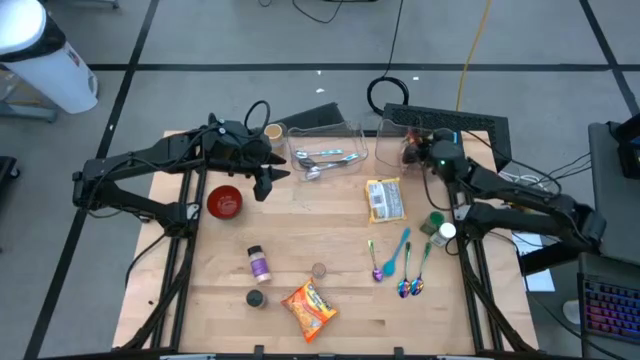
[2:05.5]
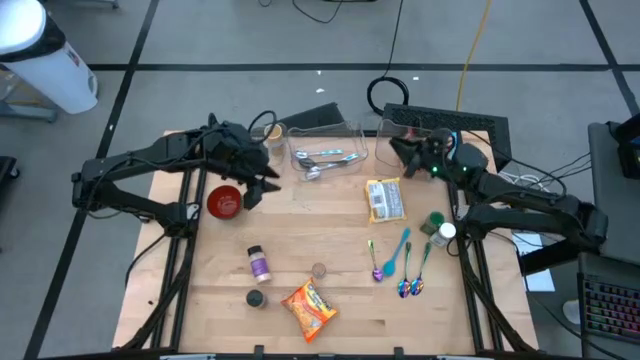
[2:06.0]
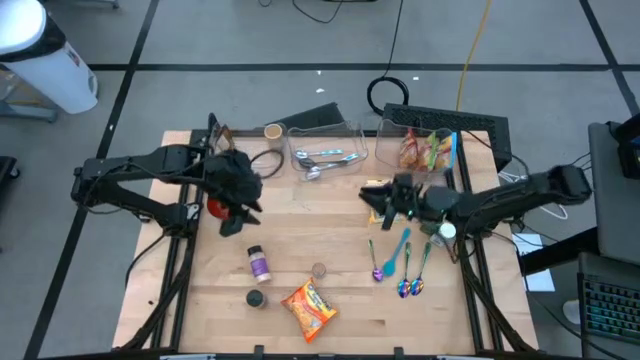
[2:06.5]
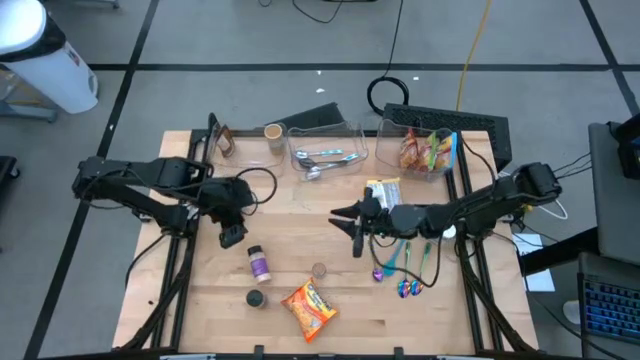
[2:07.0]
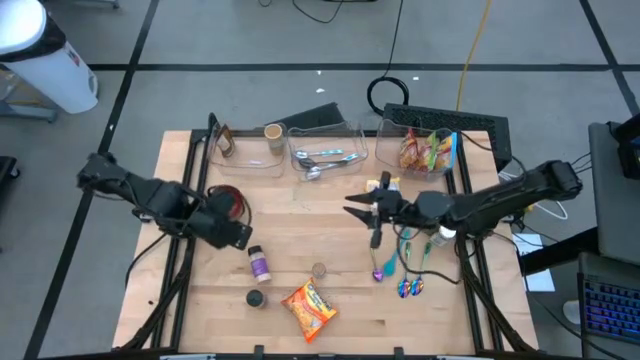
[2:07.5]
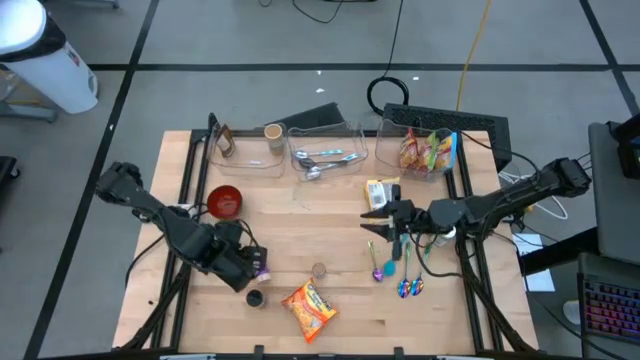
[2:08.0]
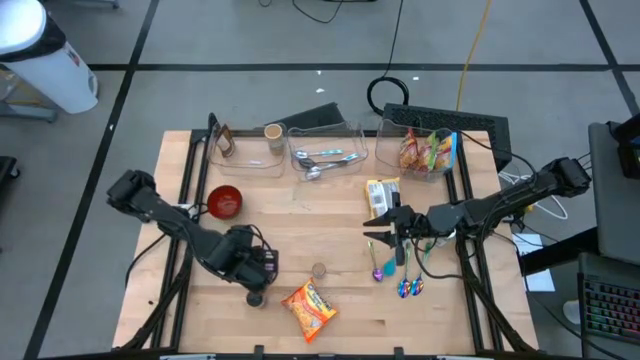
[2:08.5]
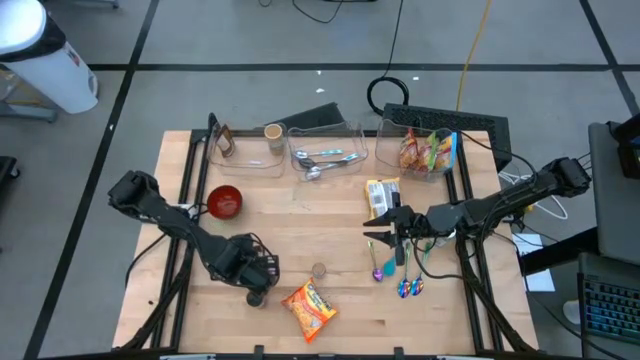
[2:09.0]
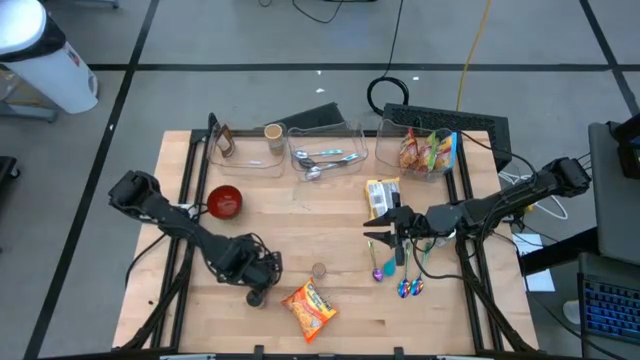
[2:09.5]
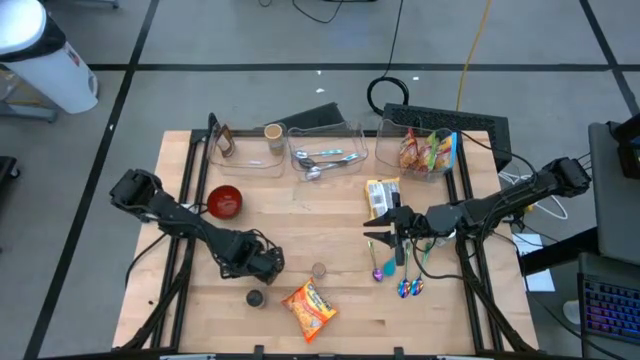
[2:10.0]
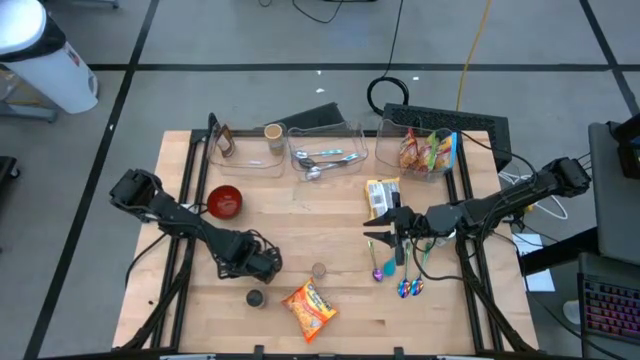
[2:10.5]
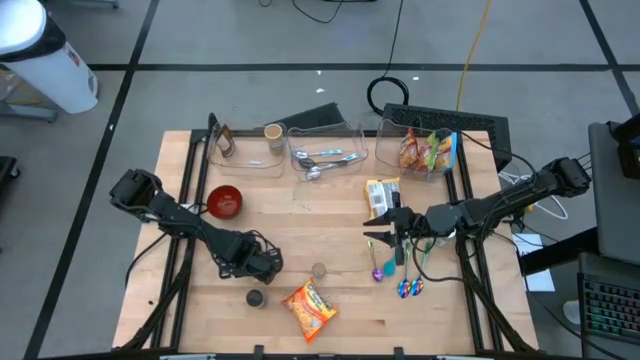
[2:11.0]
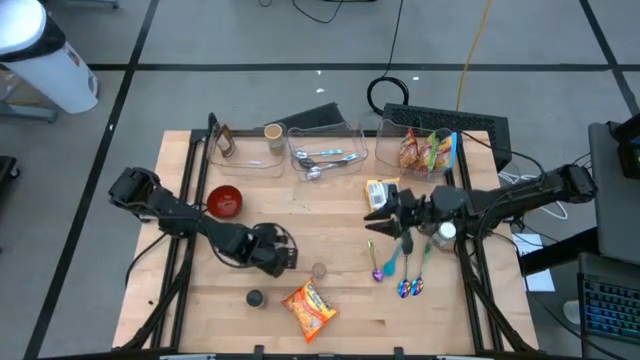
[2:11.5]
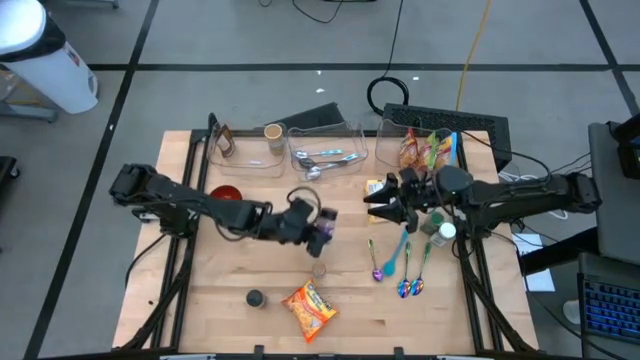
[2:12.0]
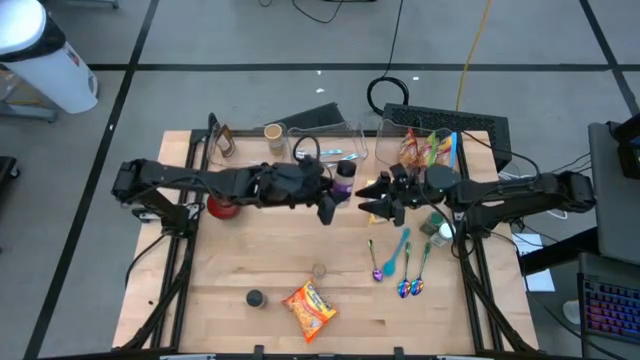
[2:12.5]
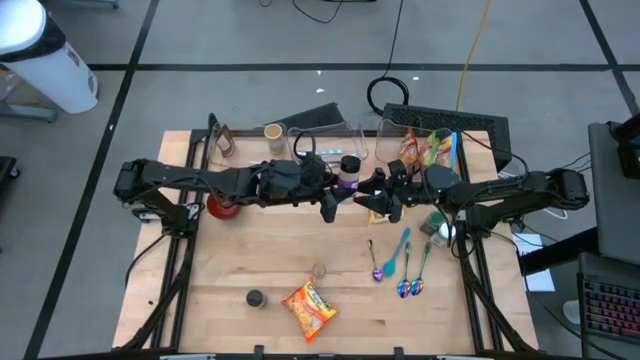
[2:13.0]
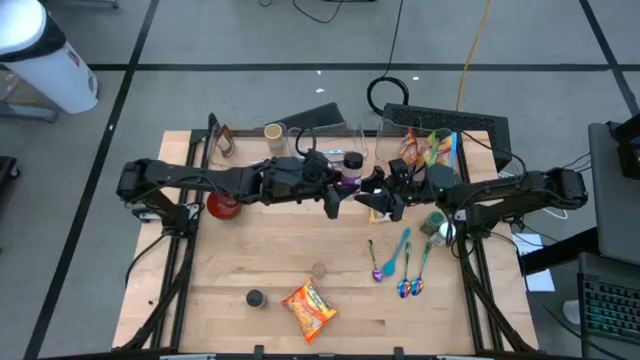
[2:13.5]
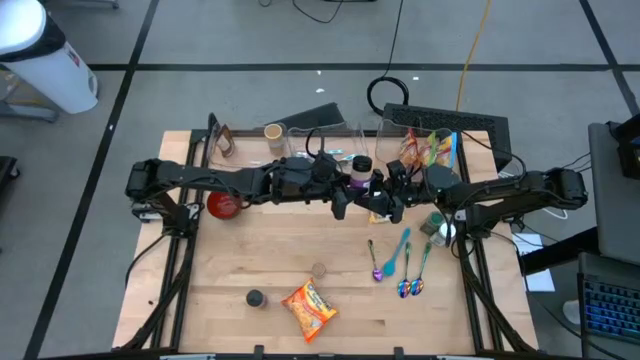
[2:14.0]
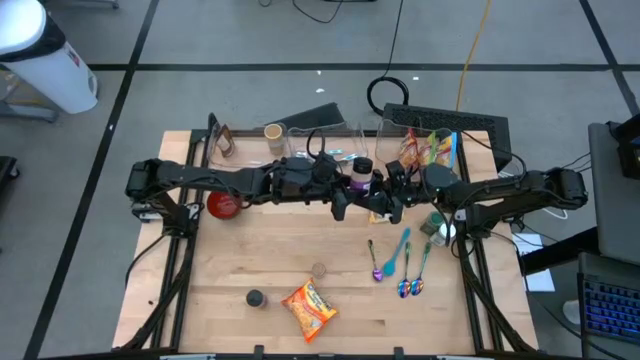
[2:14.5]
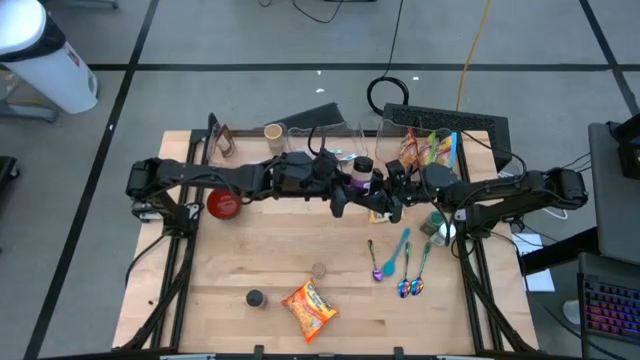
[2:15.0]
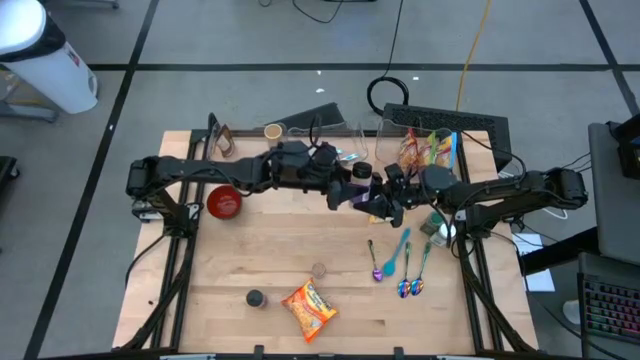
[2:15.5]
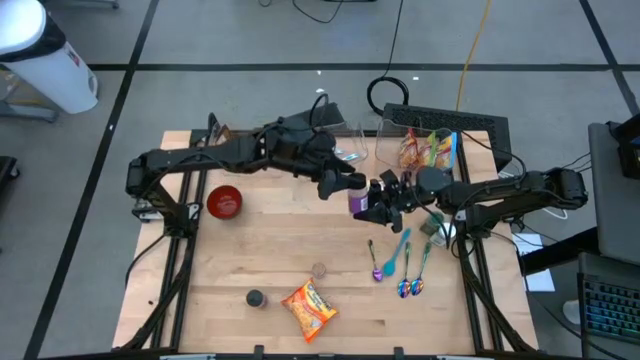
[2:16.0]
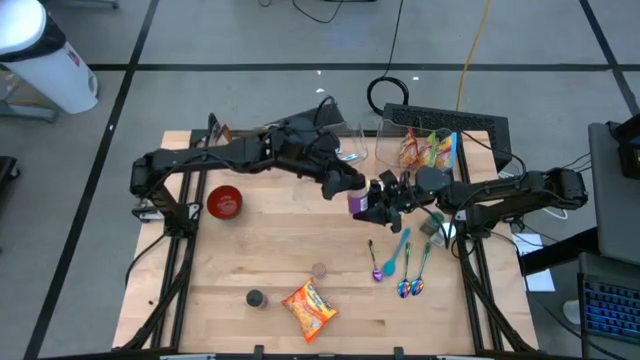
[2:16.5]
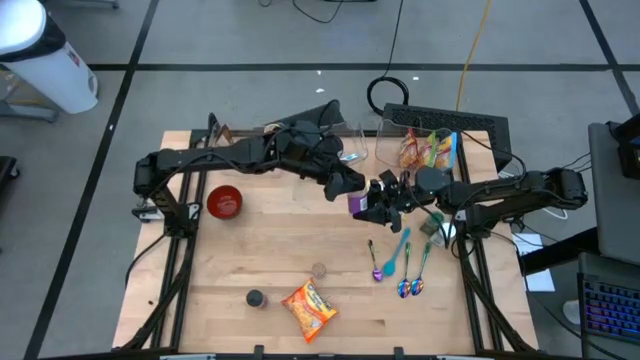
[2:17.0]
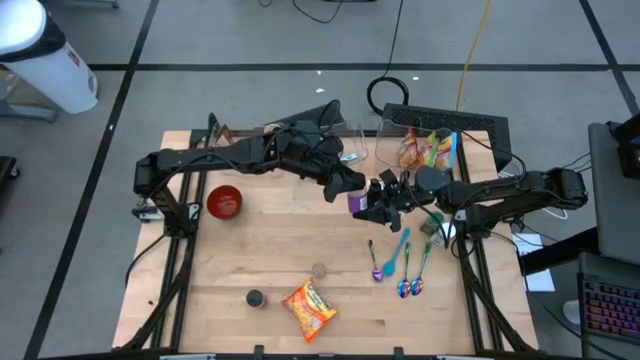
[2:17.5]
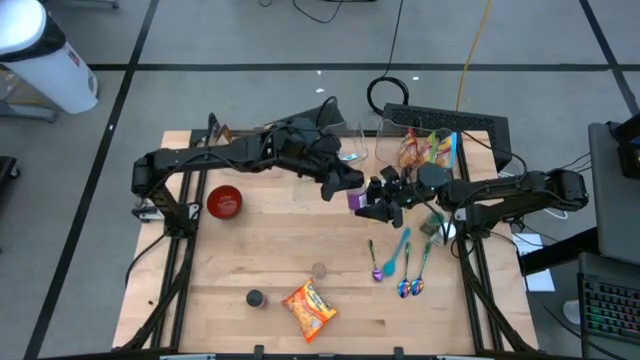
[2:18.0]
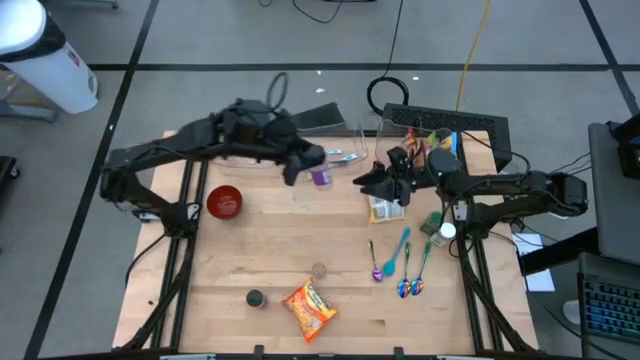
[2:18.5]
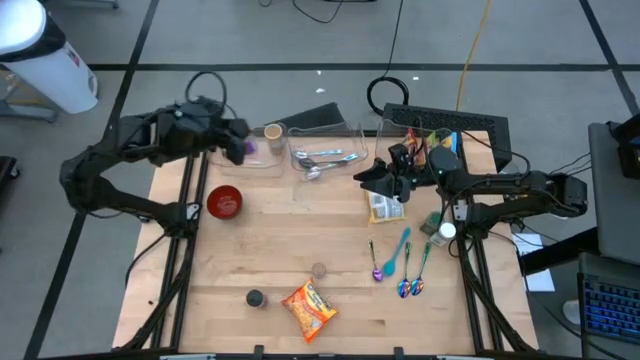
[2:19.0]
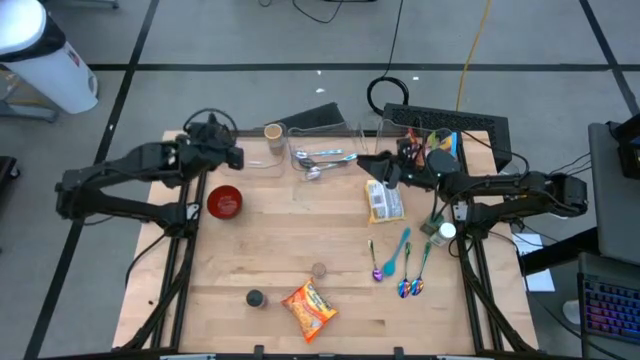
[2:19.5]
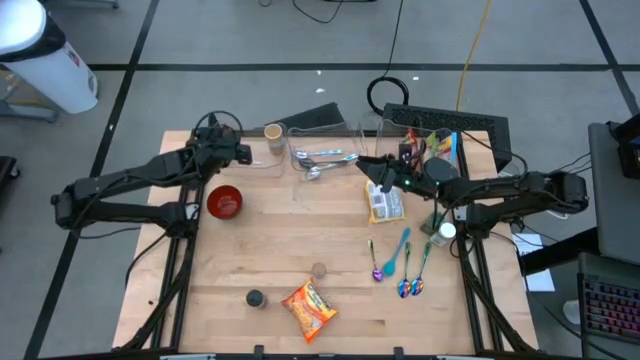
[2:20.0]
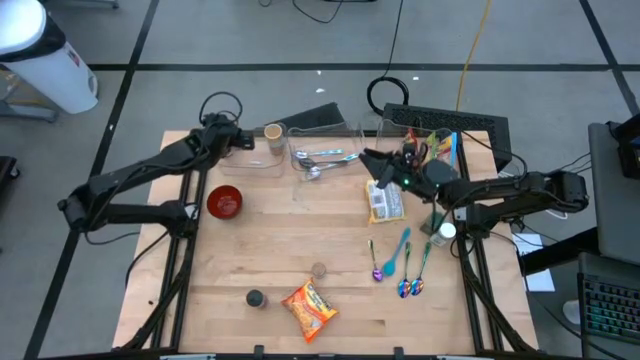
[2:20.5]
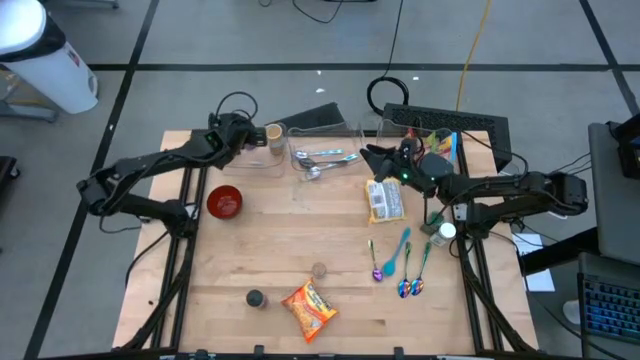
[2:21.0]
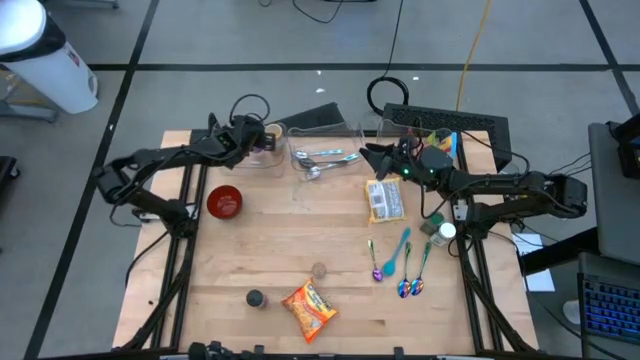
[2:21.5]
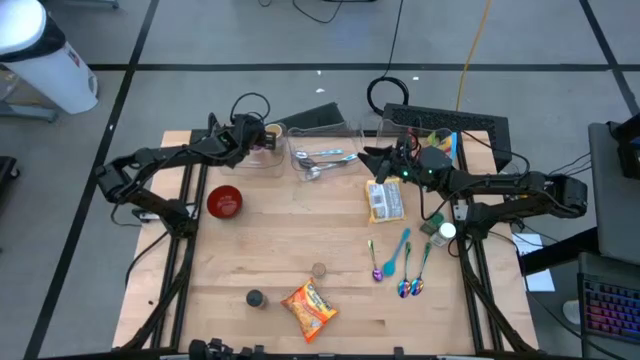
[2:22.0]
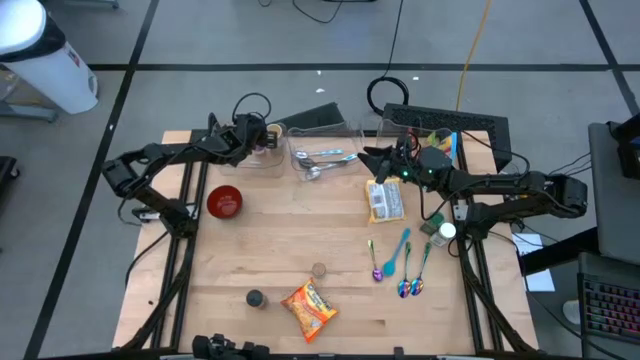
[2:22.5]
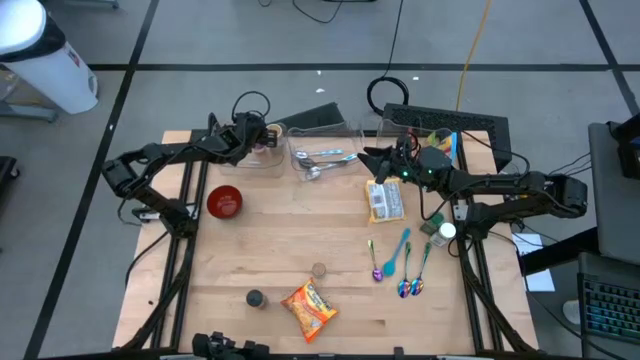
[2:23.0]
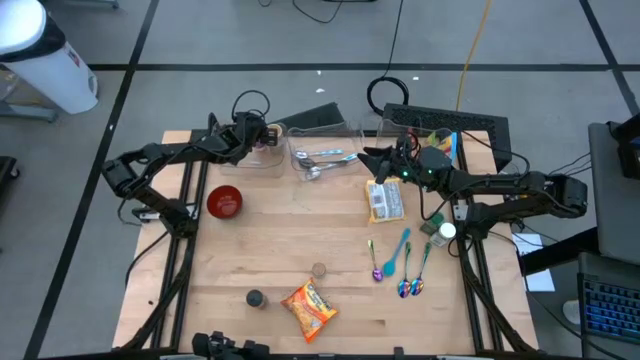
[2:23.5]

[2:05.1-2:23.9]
Task: Pick & Place Food Item
Put the violet seasoning bottle into the left transparent bin

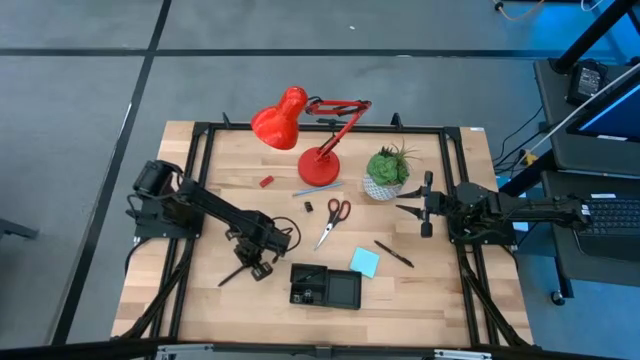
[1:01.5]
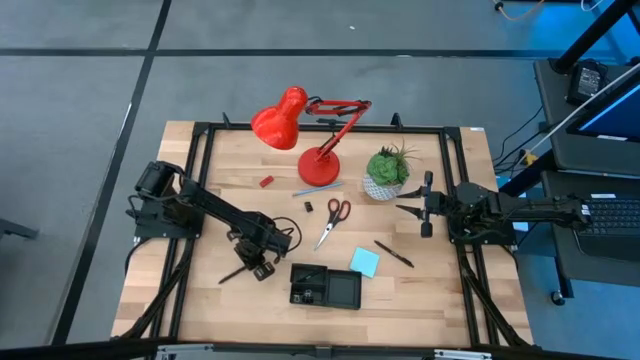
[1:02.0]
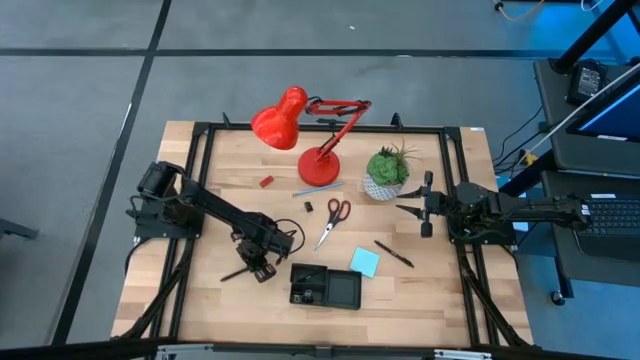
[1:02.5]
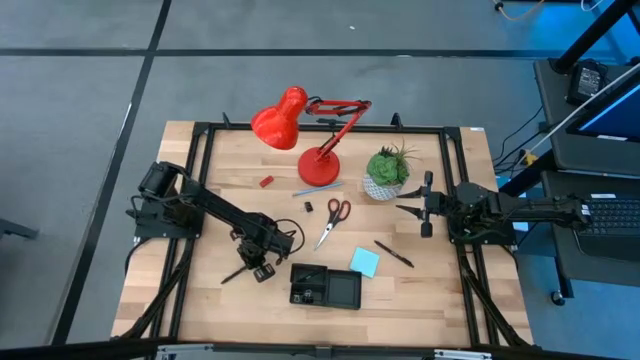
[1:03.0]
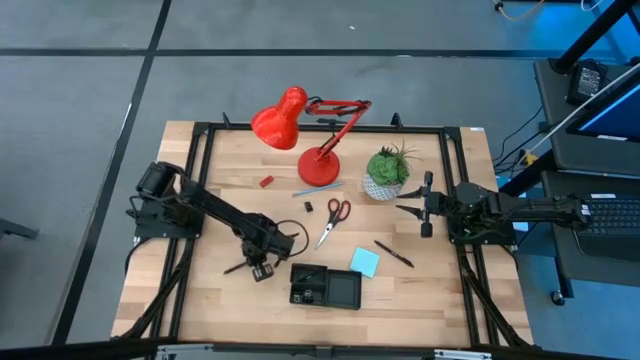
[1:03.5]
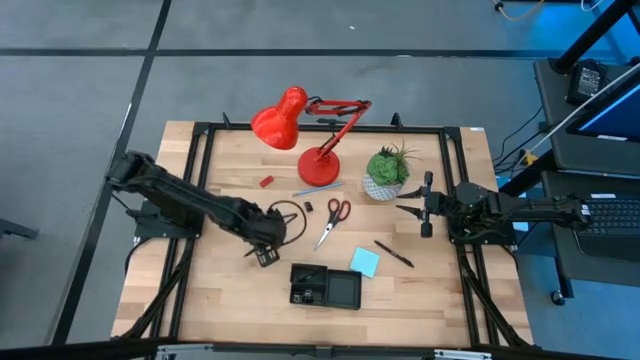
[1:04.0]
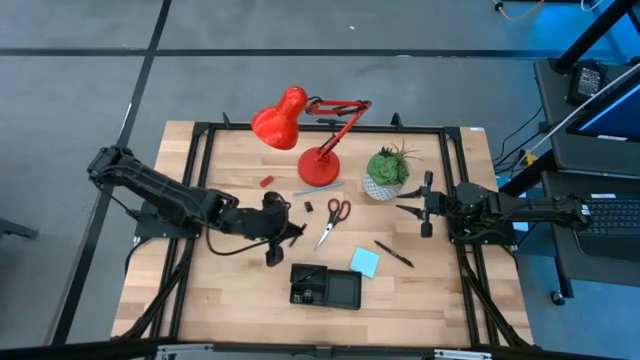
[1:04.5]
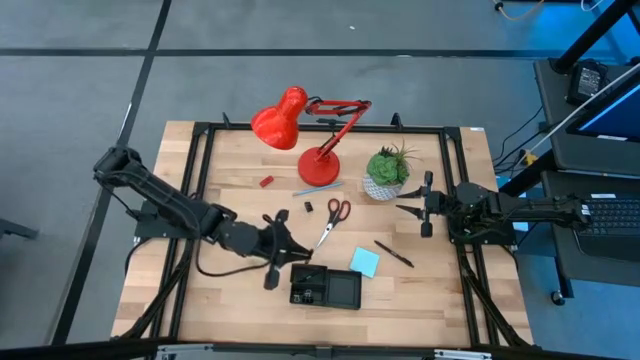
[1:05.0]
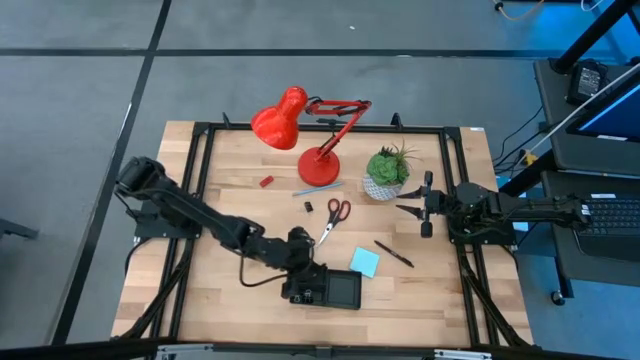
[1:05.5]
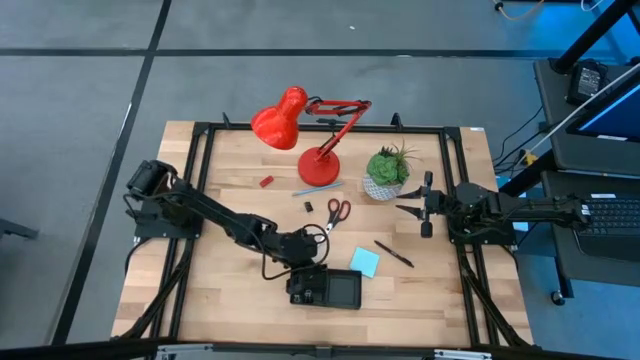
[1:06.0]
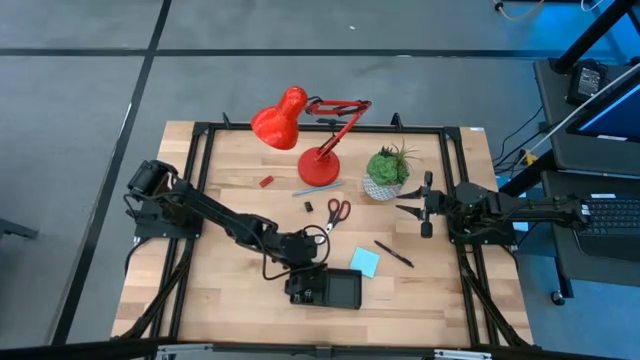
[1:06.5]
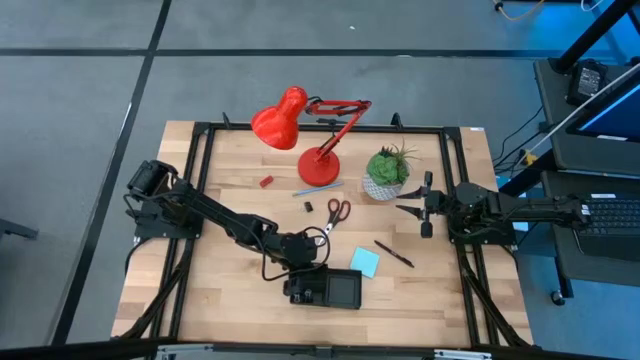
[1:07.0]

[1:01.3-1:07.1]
Task: Pick and place office supplies into organizer
Put the bottom black pen into the black desk organizer
